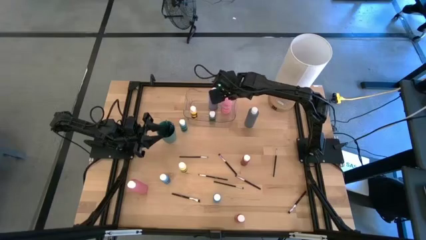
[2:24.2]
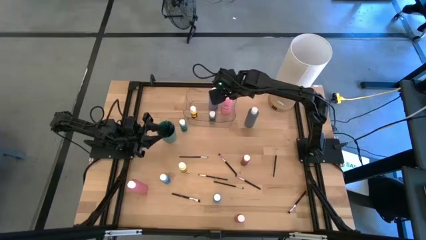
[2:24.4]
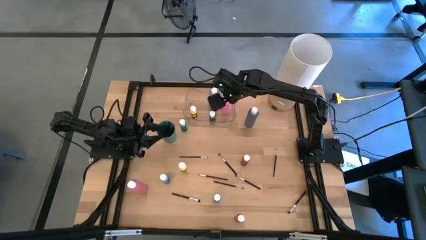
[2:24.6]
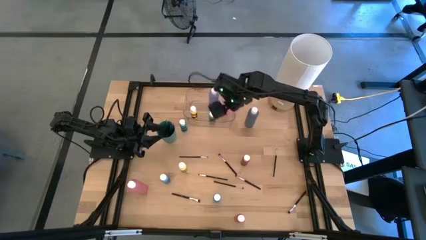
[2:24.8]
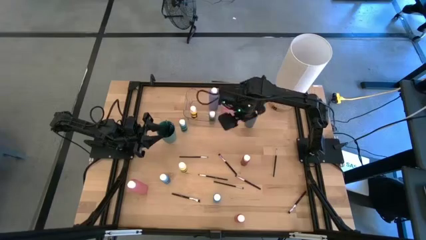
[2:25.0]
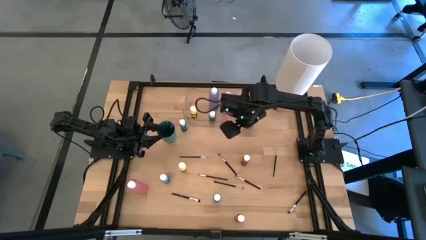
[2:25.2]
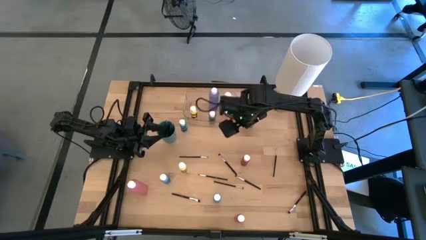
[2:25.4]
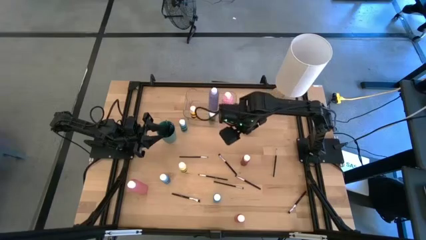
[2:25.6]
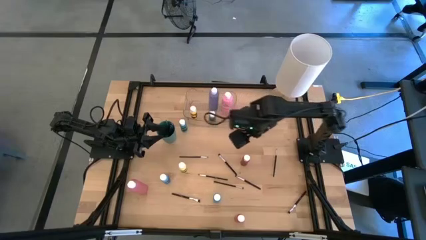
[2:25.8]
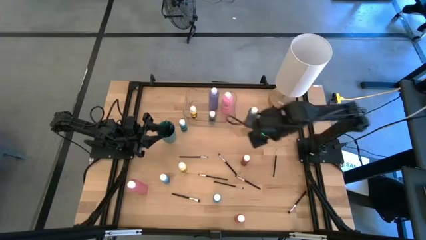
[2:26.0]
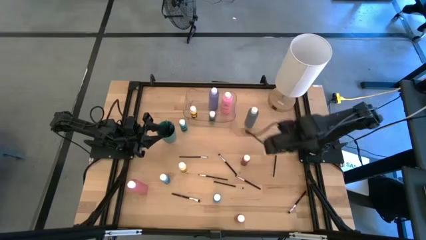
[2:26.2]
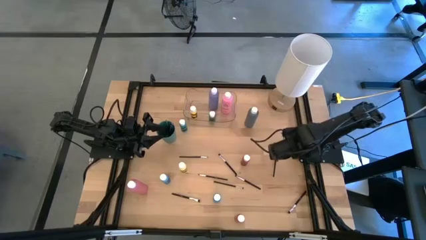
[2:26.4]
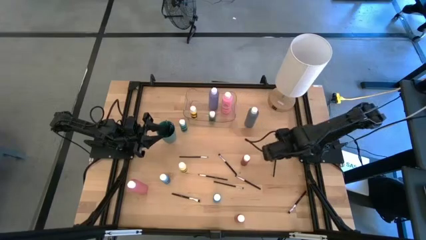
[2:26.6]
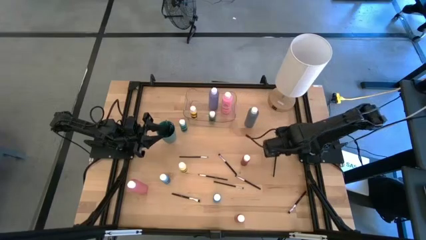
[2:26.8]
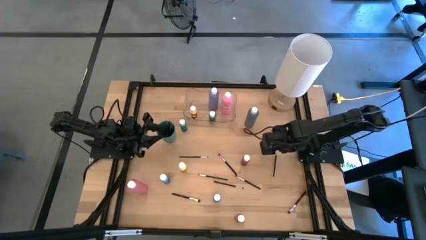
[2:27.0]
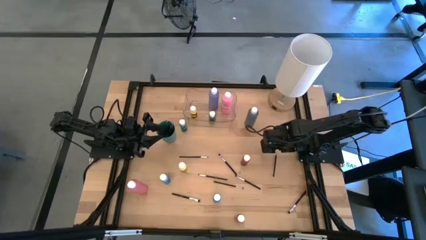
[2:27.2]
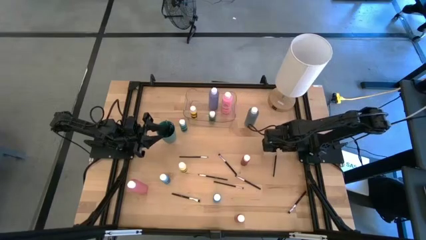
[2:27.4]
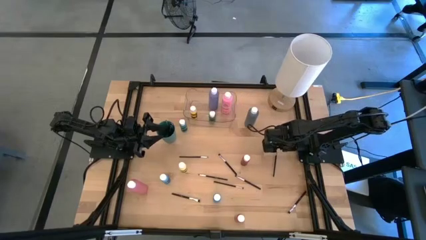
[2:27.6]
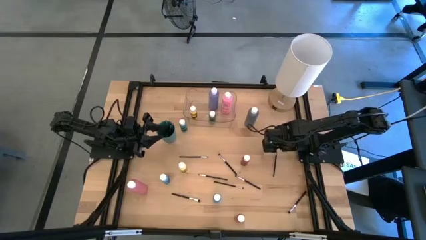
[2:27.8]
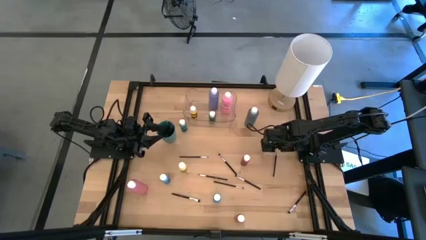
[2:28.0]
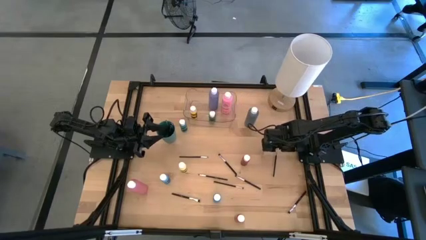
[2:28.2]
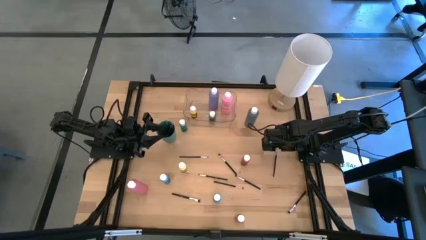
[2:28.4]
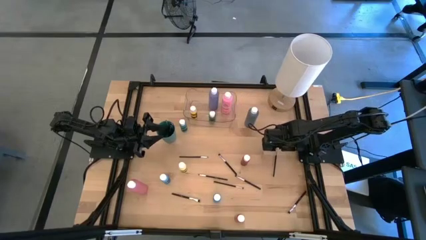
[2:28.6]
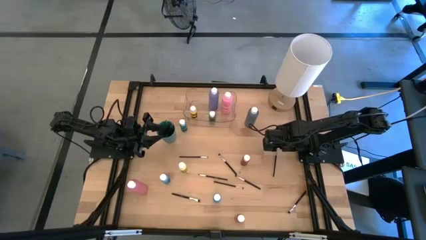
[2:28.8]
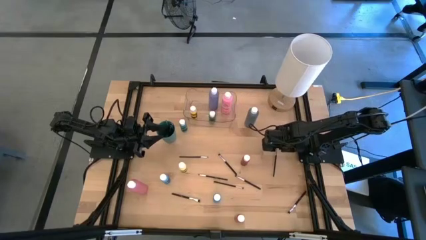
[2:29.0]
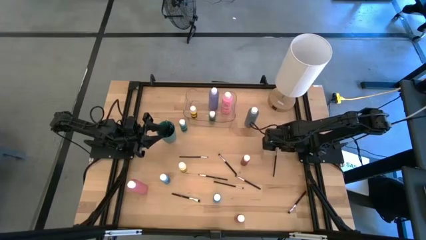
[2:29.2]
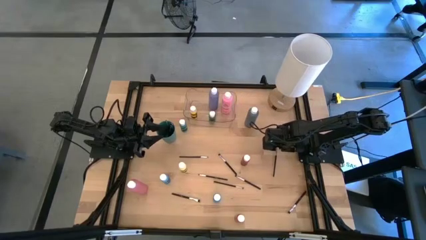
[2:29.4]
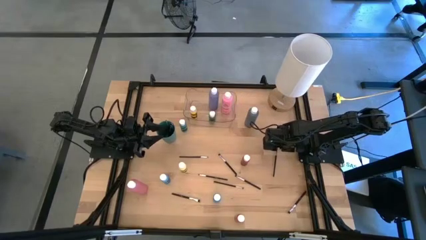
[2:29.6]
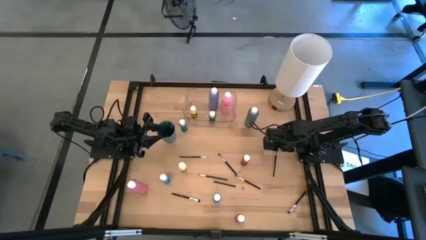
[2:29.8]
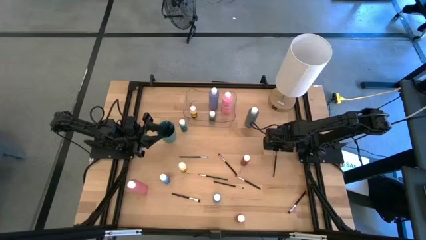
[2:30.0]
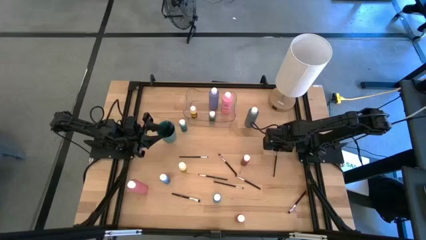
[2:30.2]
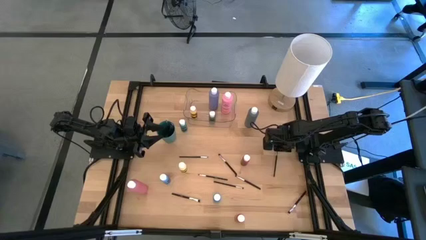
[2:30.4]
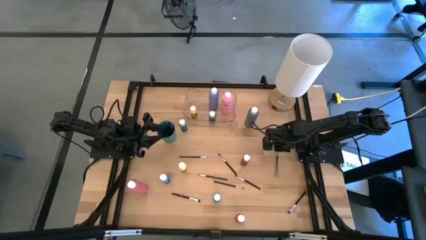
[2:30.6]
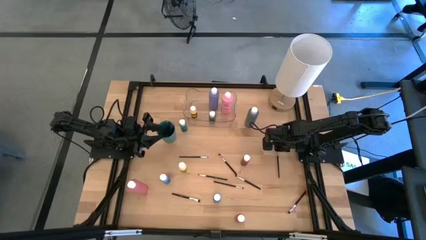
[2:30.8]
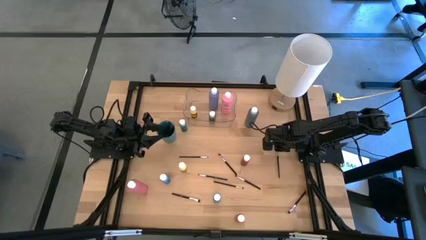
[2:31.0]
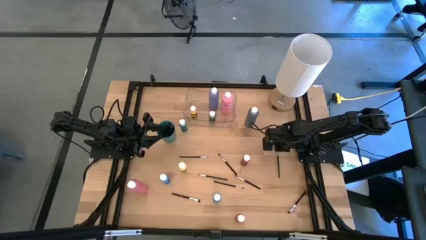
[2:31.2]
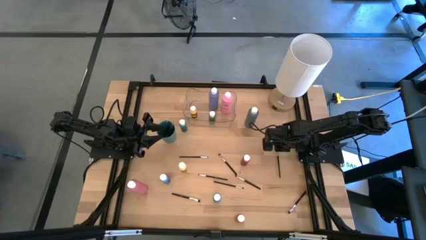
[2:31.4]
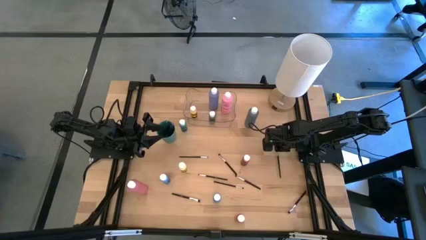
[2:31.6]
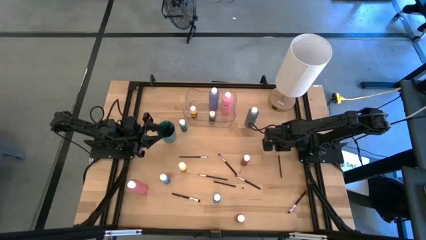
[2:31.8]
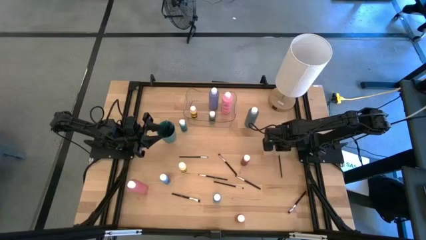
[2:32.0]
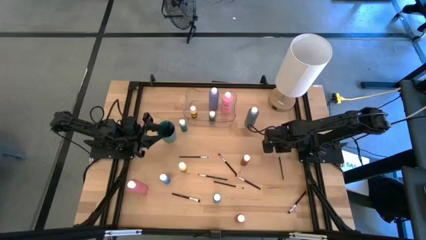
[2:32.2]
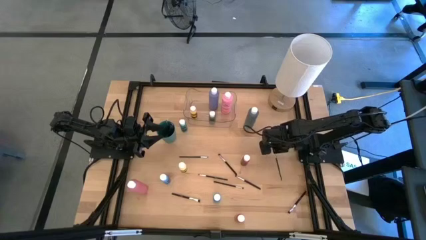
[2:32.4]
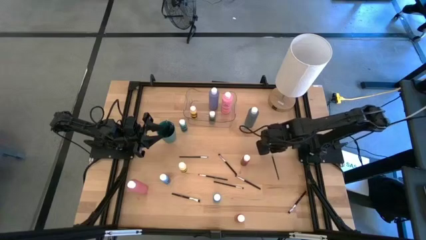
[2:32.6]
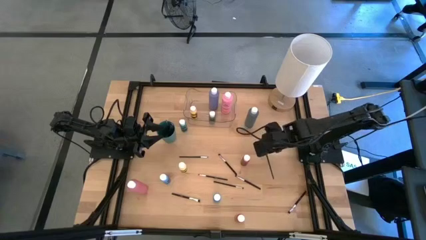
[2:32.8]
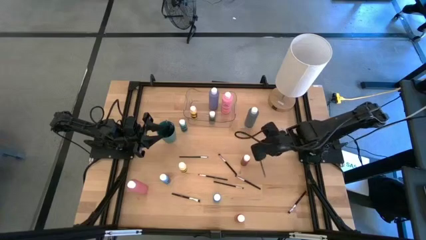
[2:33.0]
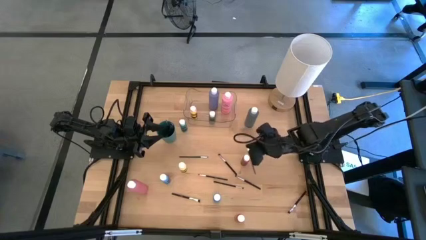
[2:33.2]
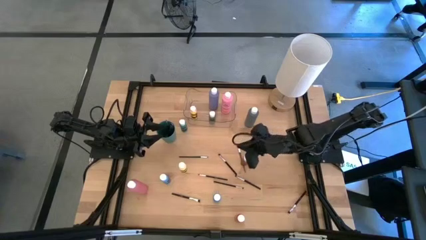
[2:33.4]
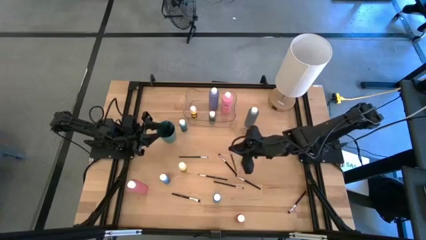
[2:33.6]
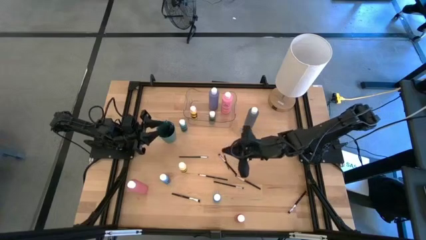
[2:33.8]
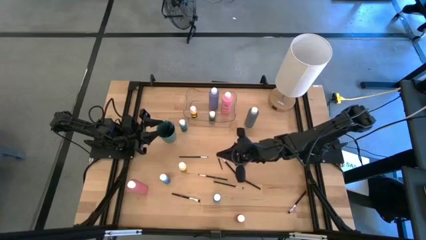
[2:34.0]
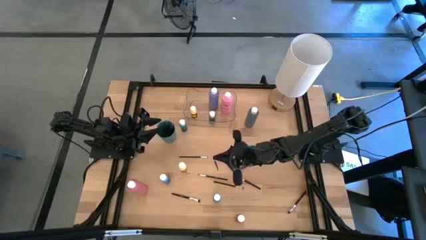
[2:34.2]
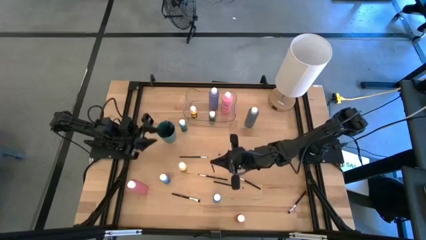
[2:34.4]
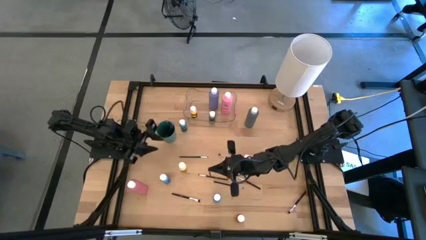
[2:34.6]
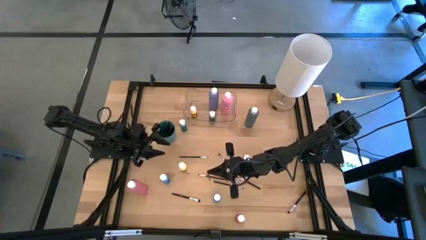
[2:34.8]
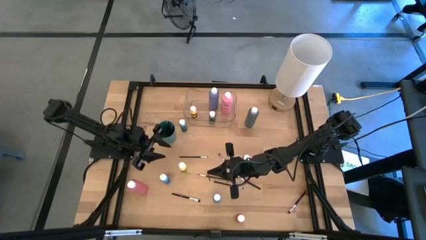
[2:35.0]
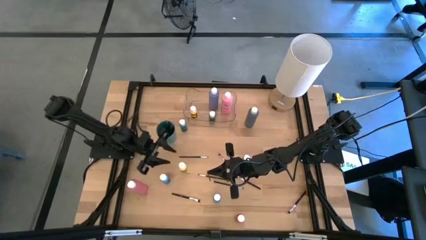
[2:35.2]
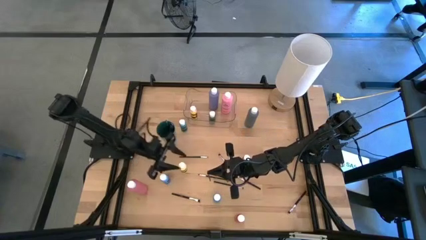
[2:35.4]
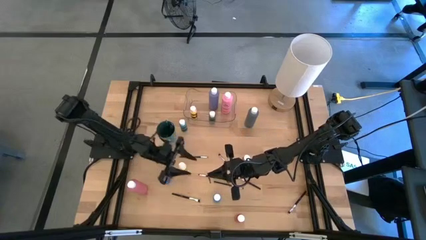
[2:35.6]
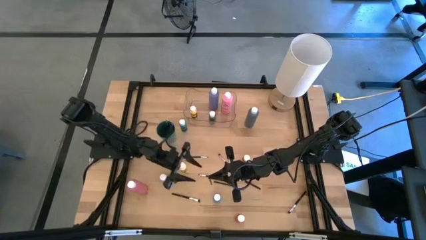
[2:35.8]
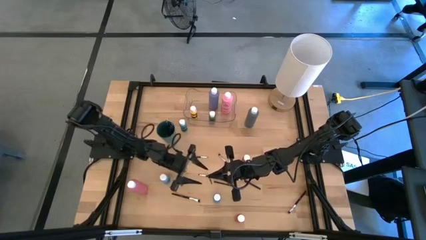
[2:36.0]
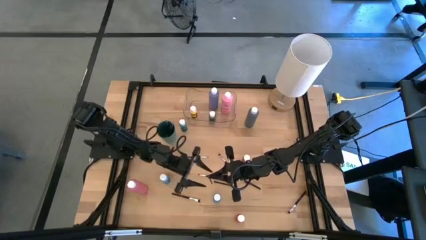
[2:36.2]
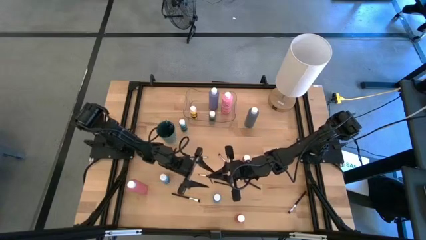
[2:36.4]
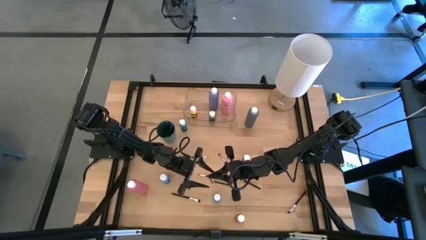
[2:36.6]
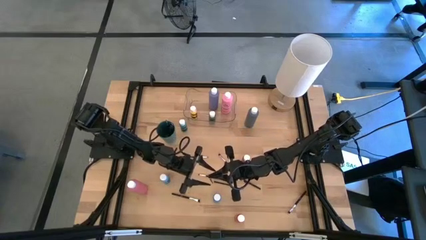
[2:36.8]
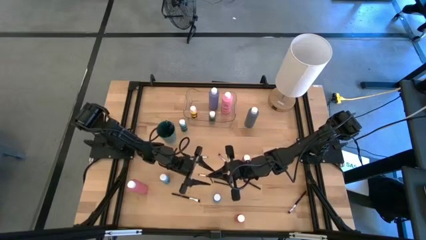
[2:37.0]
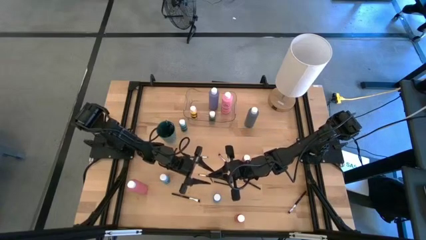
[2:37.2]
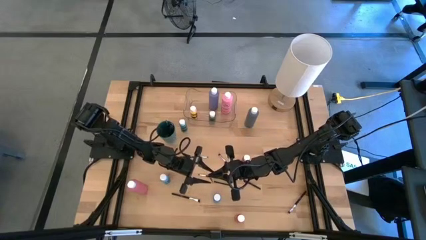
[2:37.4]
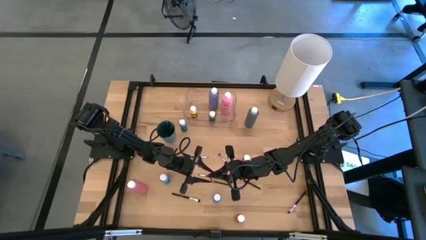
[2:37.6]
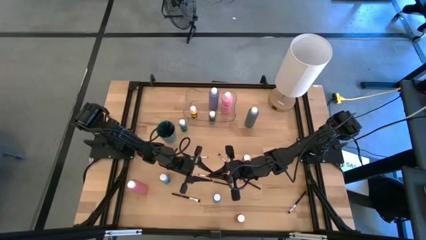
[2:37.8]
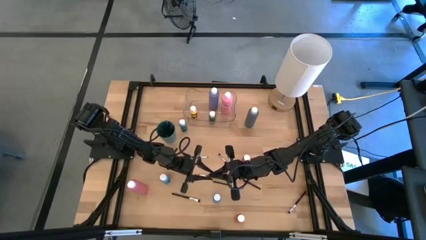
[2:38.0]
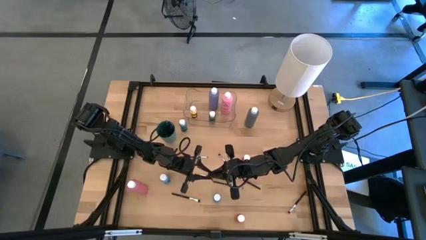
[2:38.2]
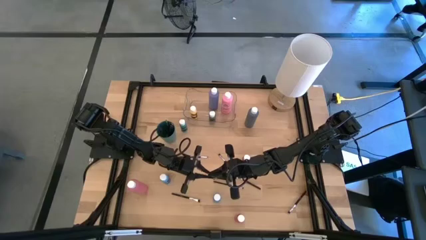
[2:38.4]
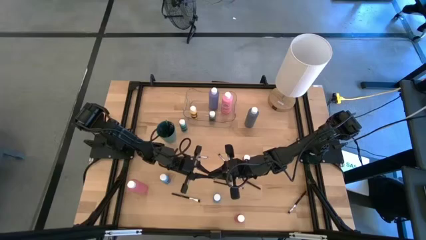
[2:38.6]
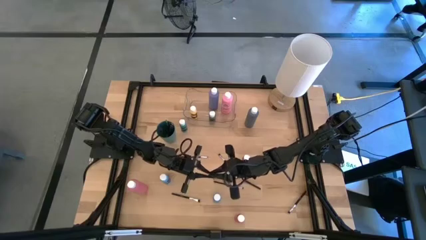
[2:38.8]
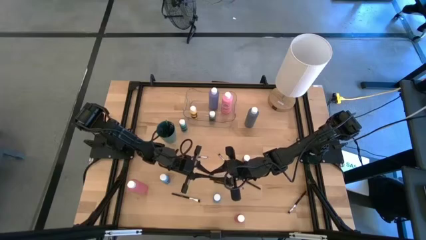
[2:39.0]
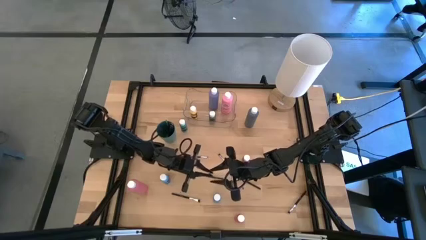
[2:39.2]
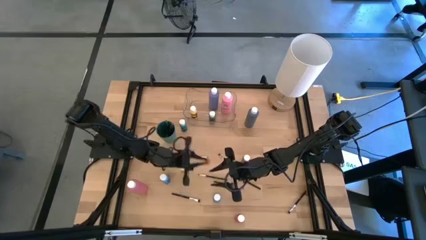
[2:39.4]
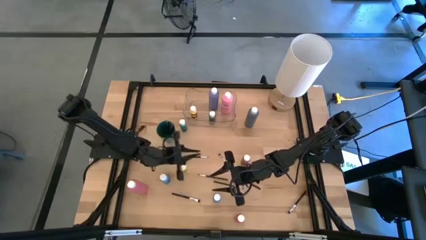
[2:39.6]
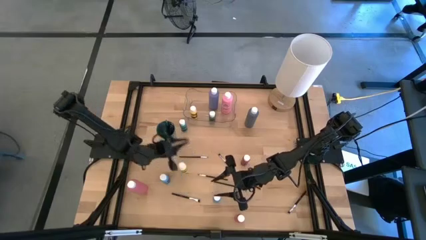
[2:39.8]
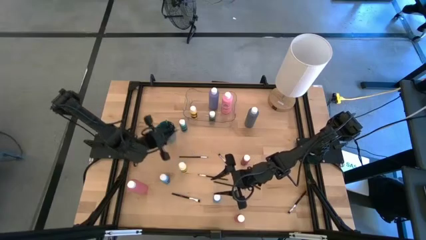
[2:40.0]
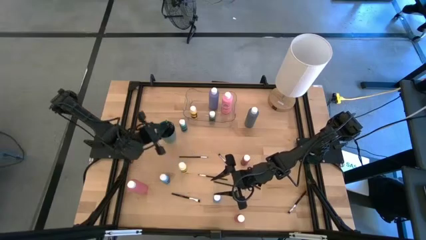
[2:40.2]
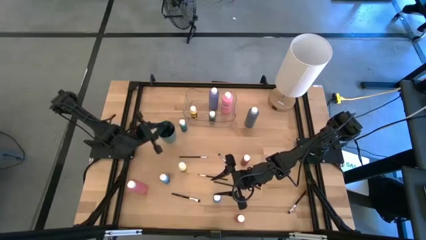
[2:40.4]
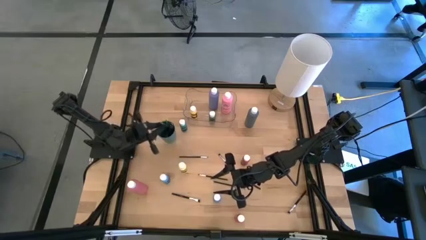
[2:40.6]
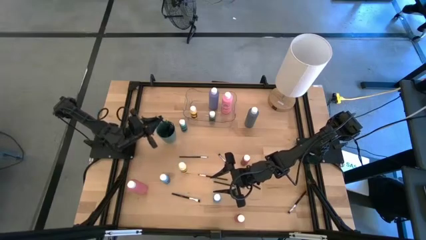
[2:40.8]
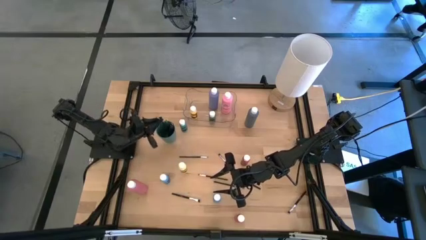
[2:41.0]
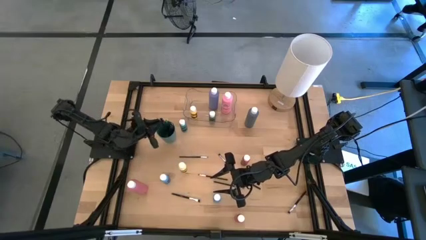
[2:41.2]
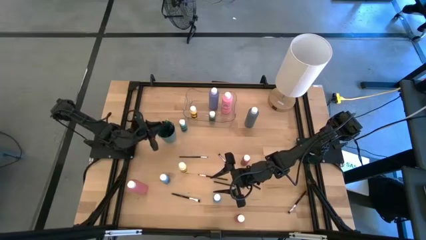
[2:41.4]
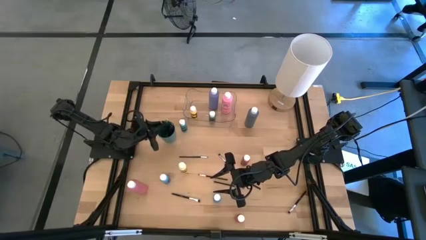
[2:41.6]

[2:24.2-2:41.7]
Task: Pick & Place Paint Supplies
Put the black paint brush into the green cup
